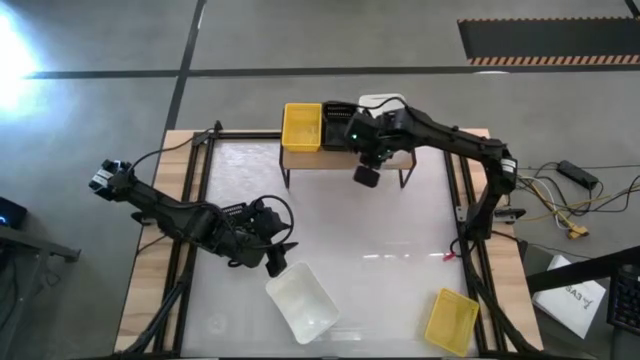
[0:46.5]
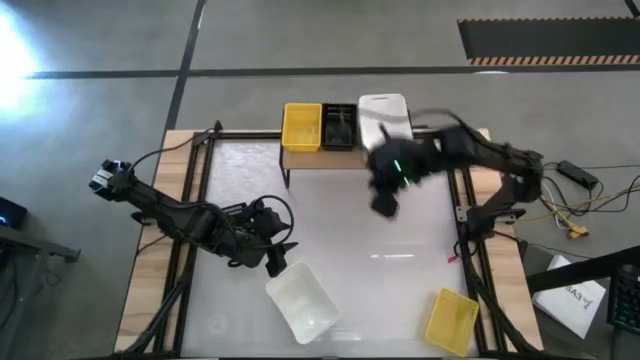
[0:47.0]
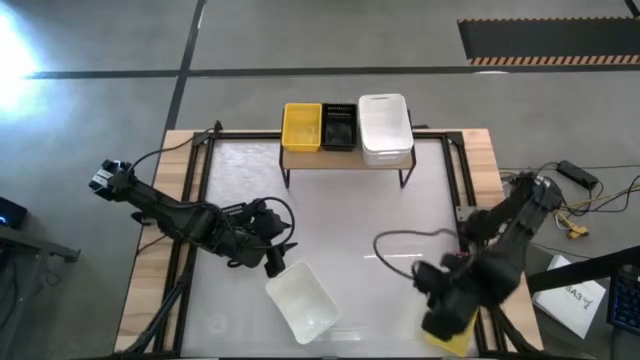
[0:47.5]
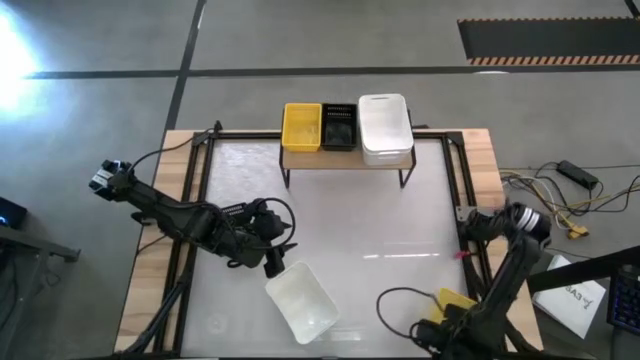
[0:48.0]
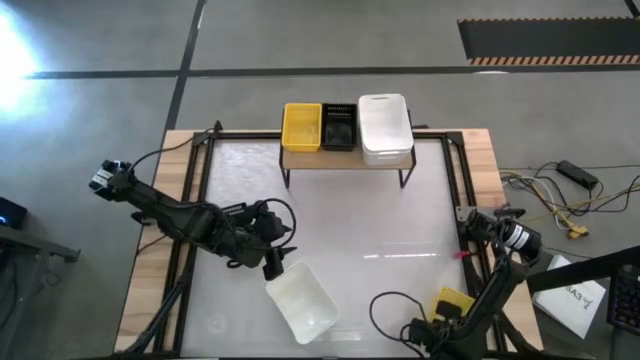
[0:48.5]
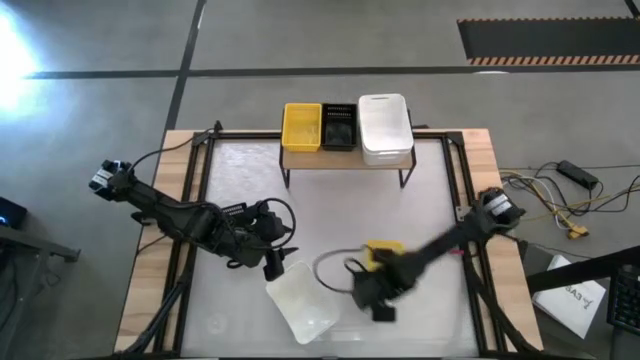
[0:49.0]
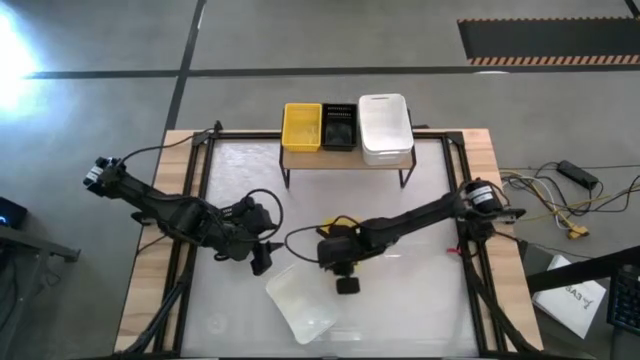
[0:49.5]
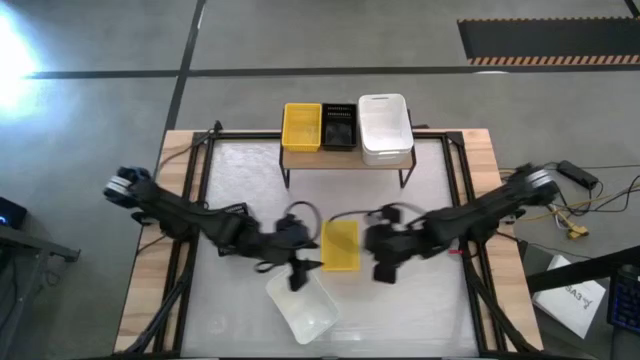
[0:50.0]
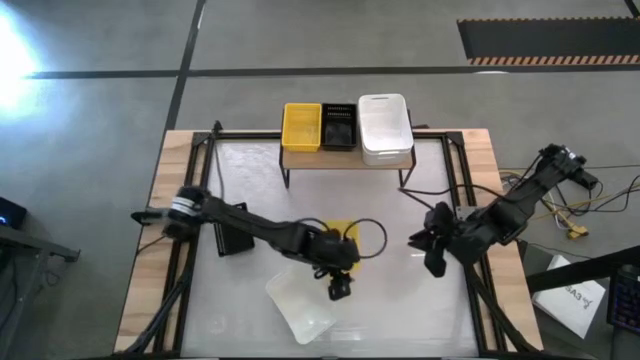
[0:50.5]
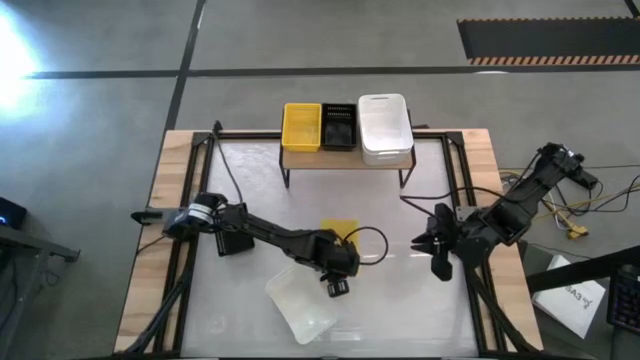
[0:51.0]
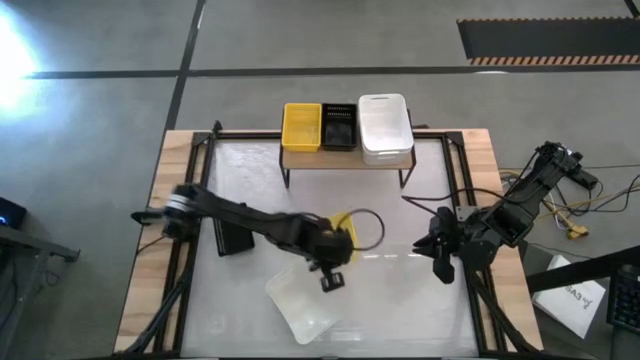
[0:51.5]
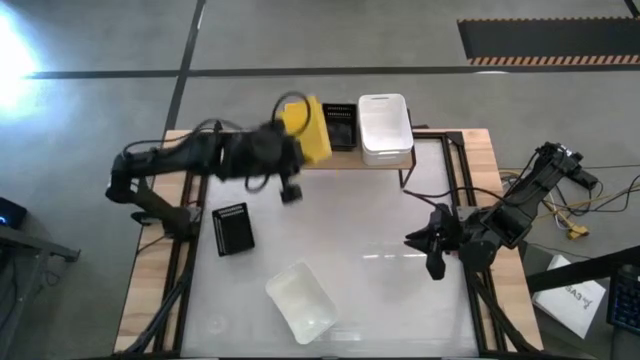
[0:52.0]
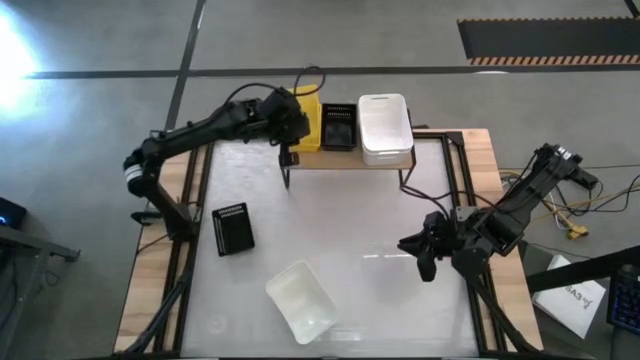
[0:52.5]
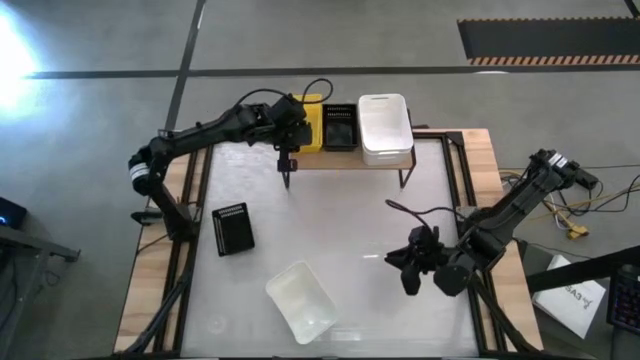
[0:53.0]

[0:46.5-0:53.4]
Task: Stack baskets on shelf by color
Stack the yellow bin on top of the yellow bins on the shelf

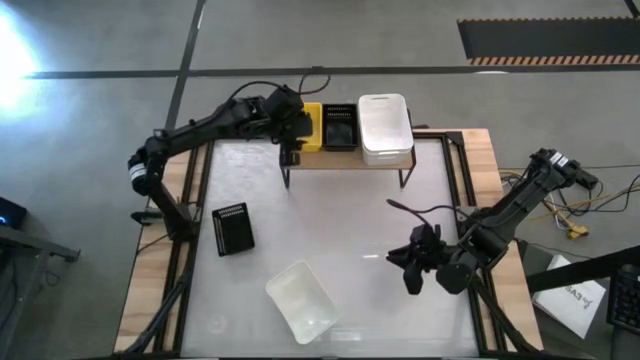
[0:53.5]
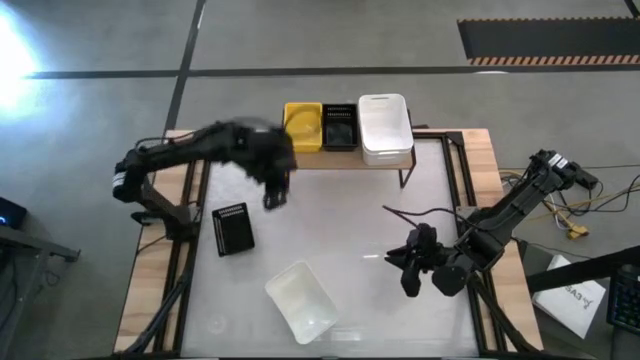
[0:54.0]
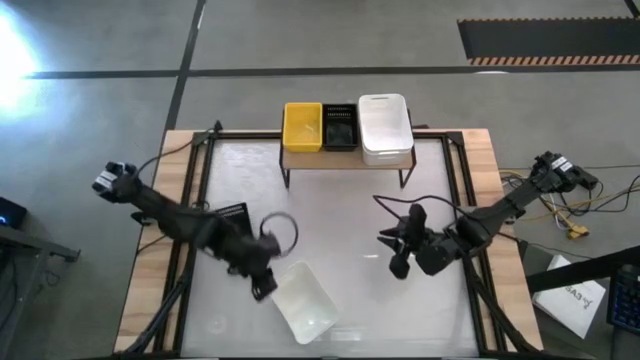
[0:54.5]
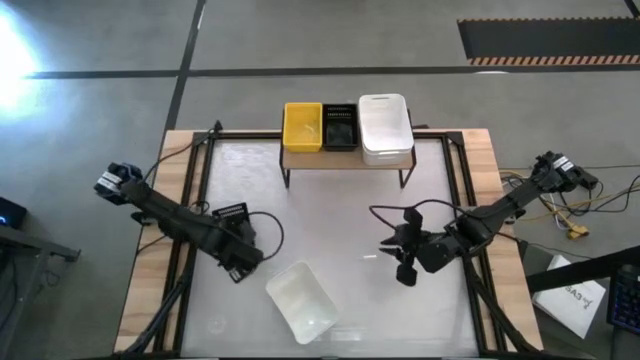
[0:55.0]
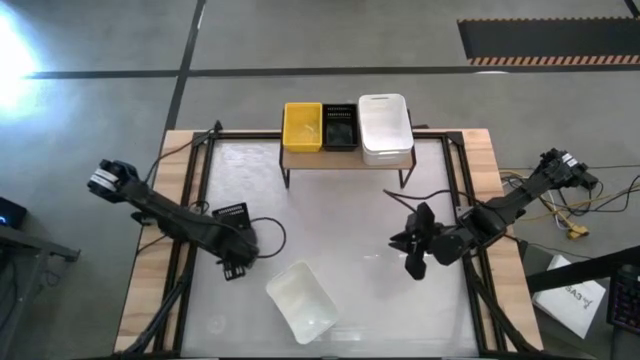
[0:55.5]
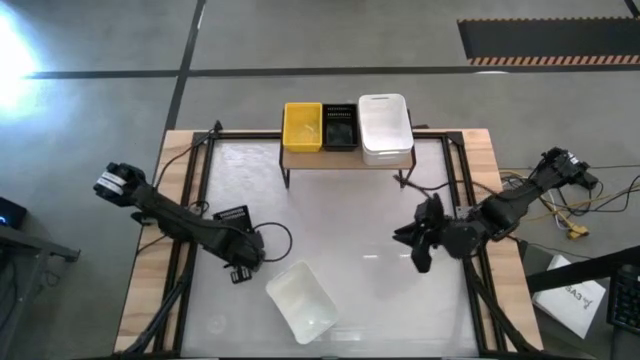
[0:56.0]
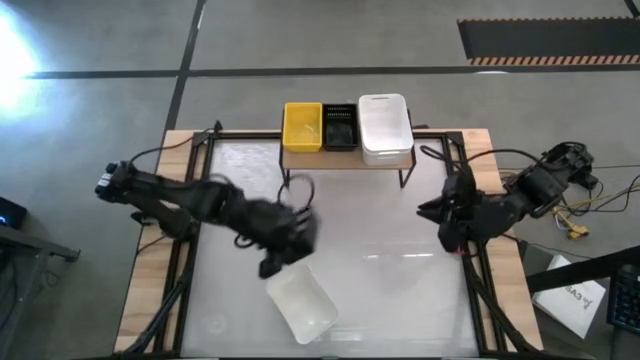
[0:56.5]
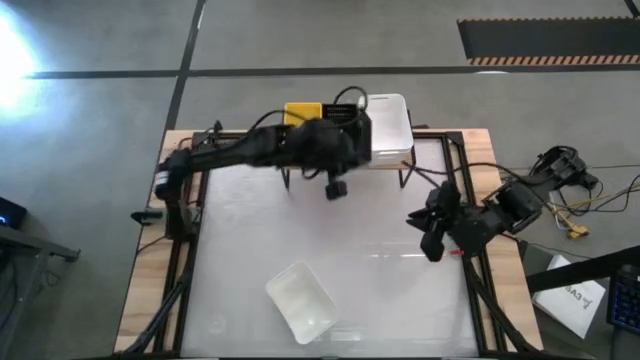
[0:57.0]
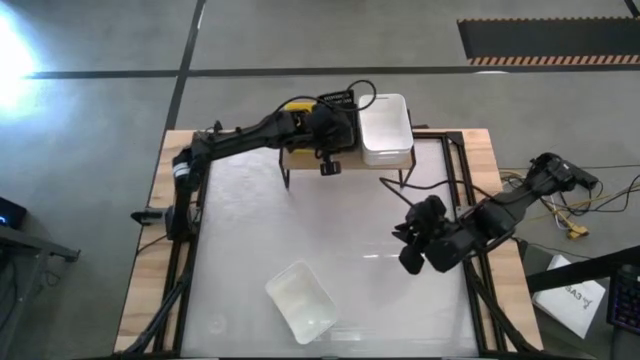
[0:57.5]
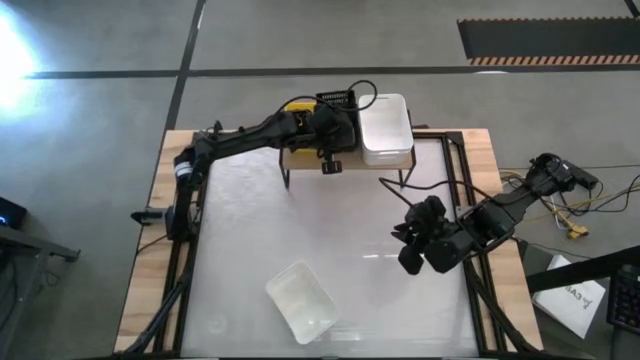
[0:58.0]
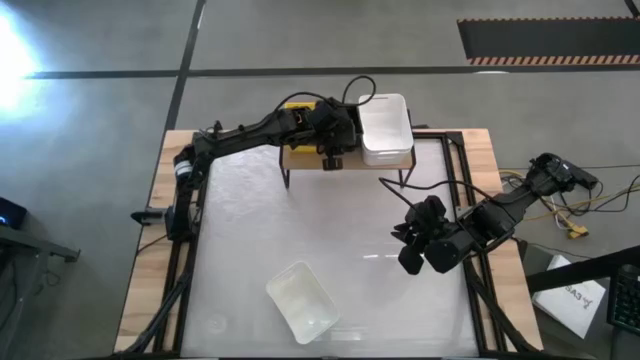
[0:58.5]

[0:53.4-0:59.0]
Stack the black bin on top of the black bins on the shelf

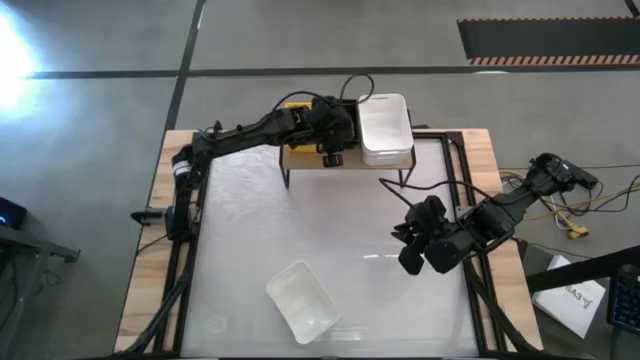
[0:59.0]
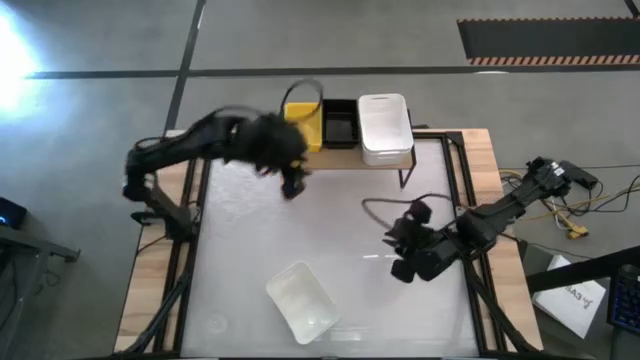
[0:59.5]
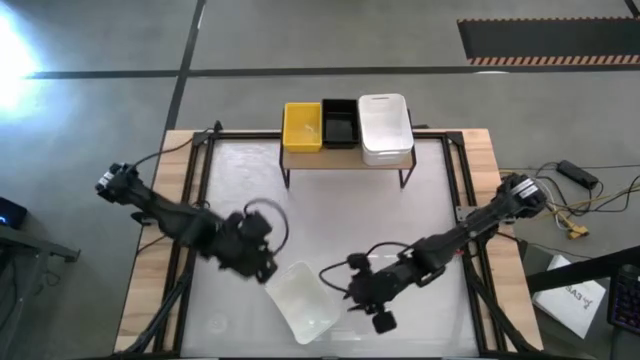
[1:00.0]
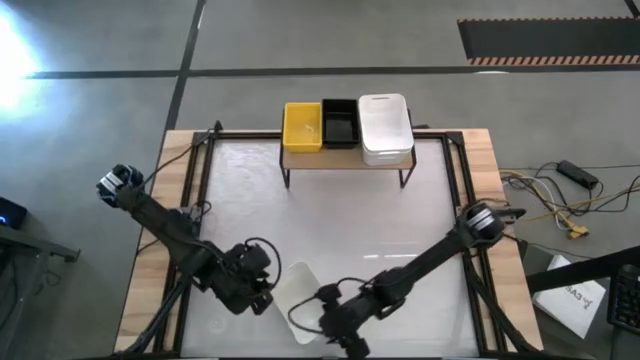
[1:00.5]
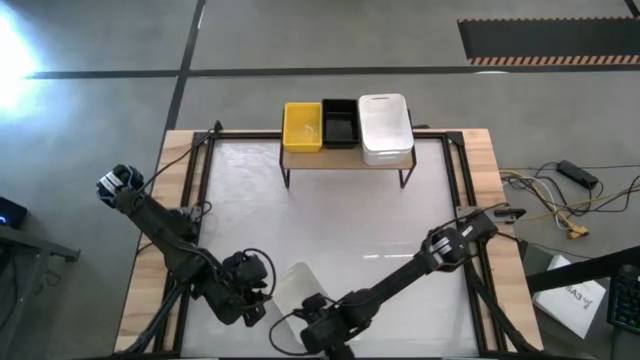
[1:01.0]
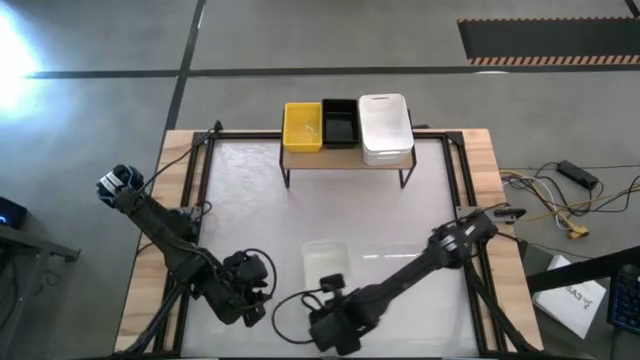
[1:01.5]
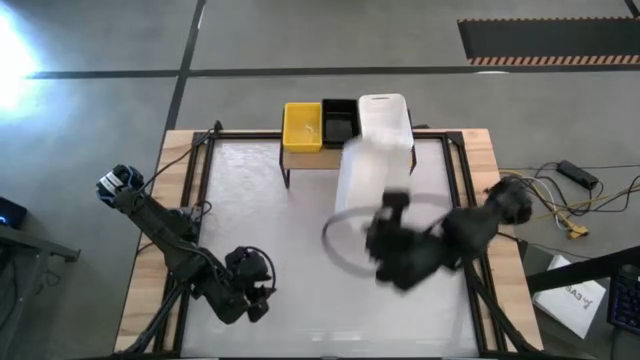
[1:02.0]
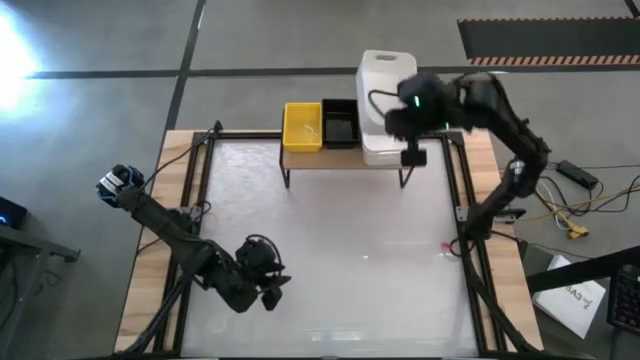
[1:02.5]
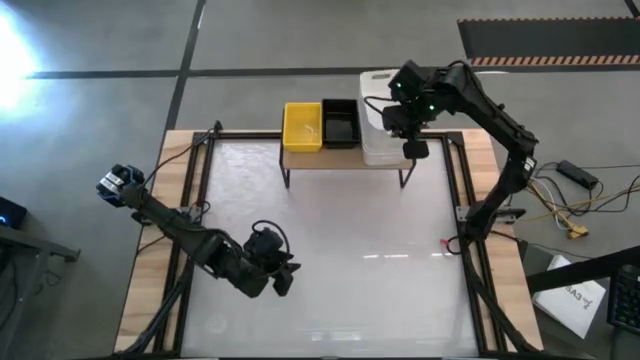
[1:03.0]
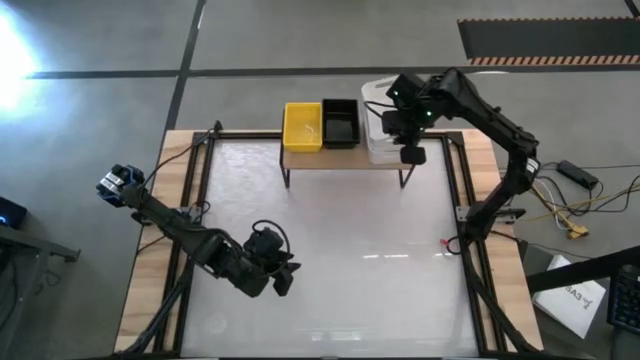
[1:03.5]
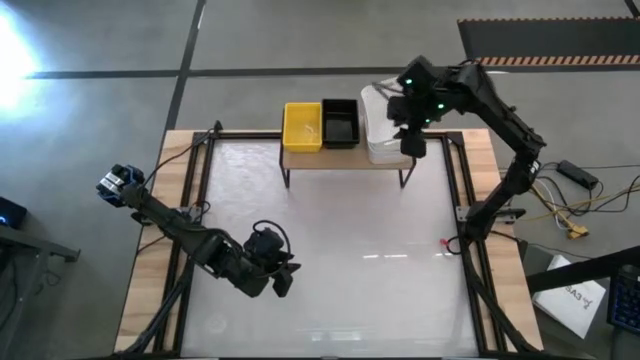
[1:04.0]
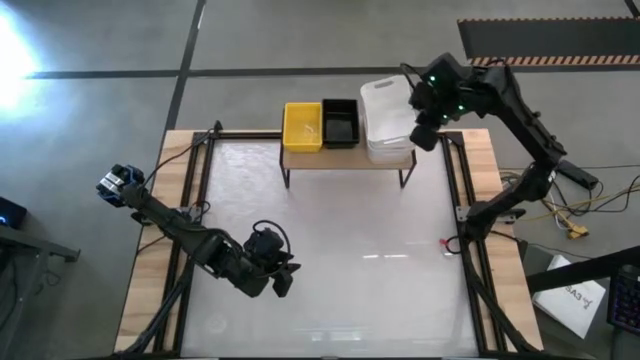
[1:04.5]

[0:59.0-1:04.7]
Stack the white bin on top of the white bins on the shelf

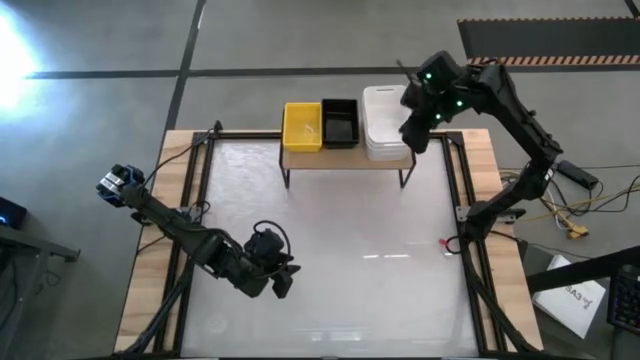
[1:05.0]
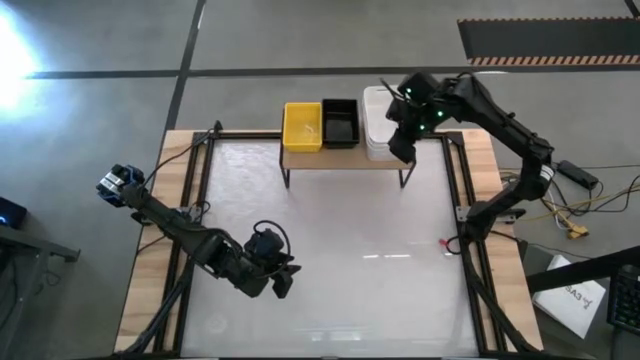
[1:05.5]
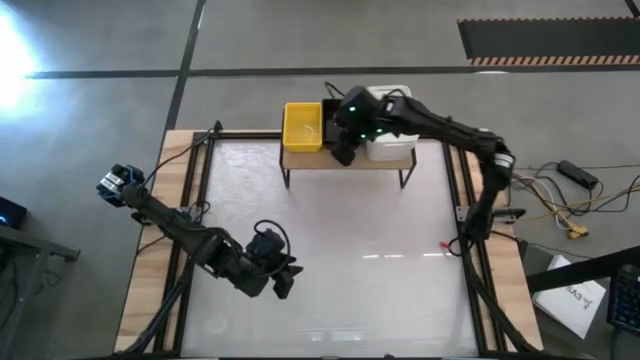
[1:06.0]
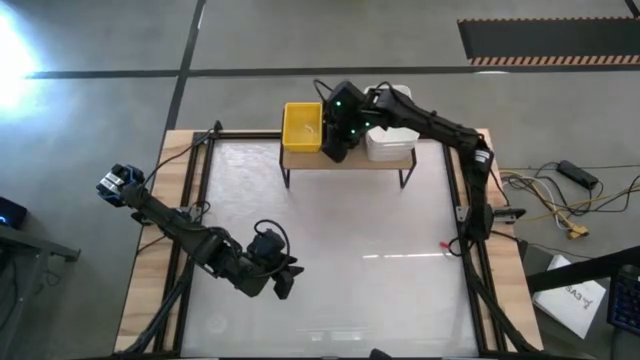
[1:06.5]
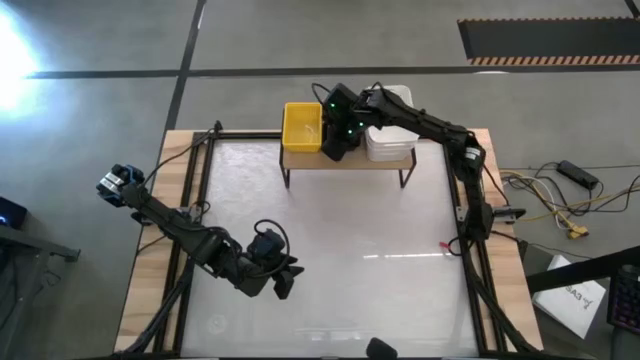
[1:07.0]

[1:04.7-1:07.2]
Adjust the stacked black bins on the shelf
